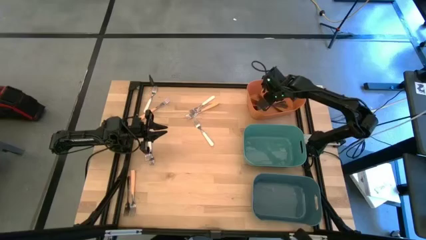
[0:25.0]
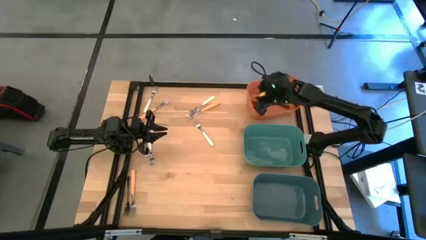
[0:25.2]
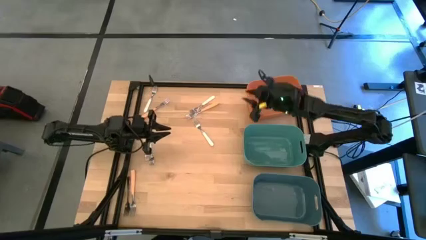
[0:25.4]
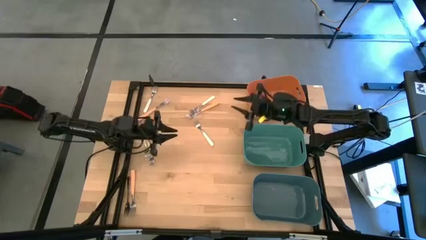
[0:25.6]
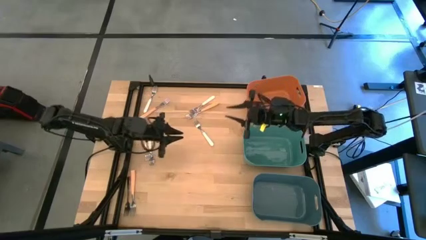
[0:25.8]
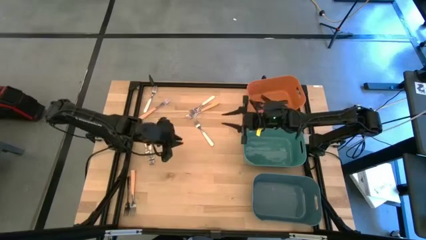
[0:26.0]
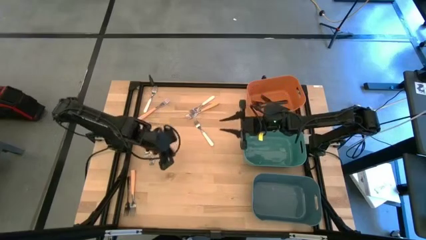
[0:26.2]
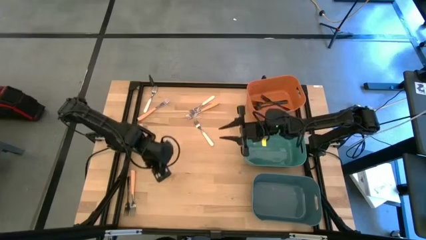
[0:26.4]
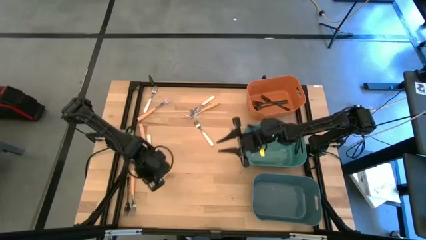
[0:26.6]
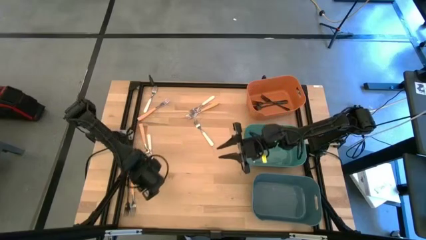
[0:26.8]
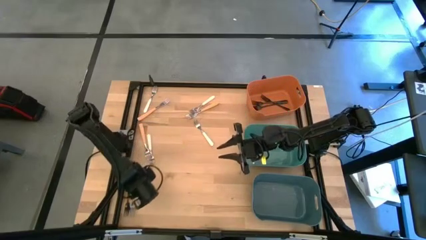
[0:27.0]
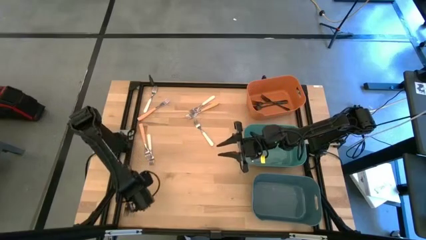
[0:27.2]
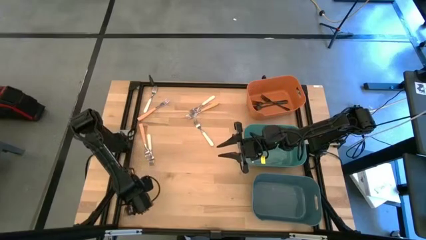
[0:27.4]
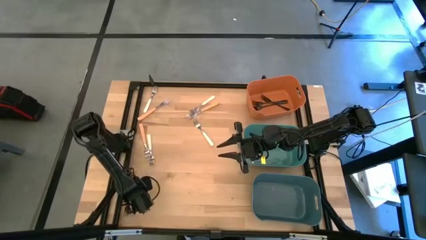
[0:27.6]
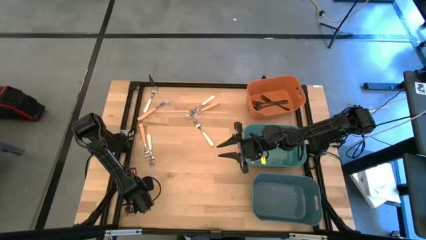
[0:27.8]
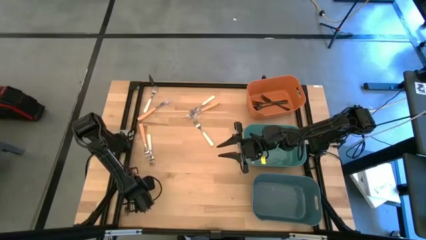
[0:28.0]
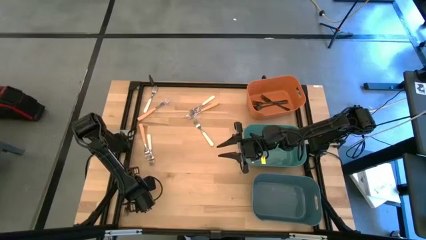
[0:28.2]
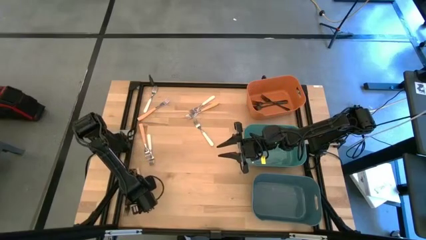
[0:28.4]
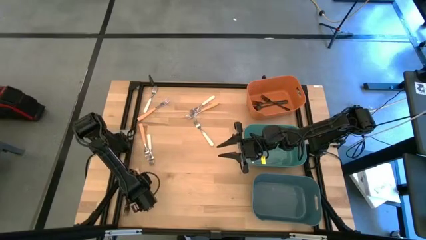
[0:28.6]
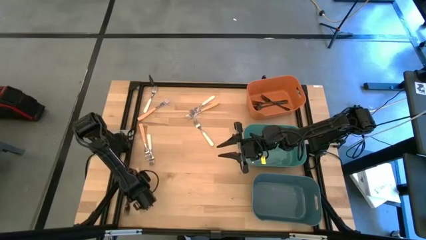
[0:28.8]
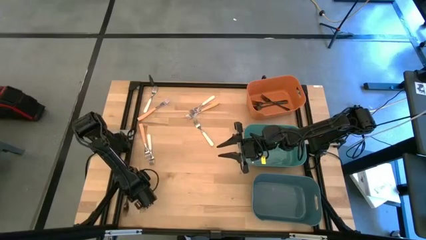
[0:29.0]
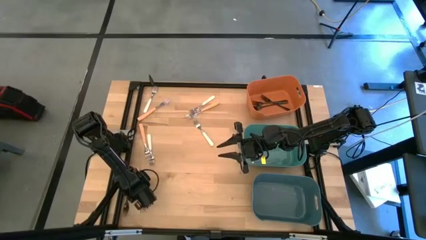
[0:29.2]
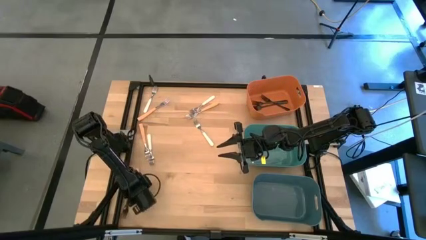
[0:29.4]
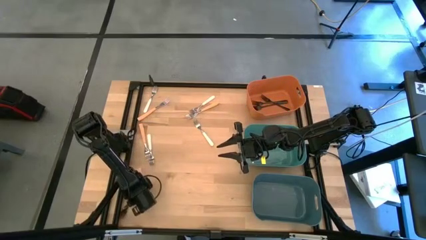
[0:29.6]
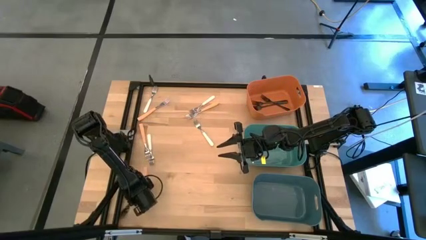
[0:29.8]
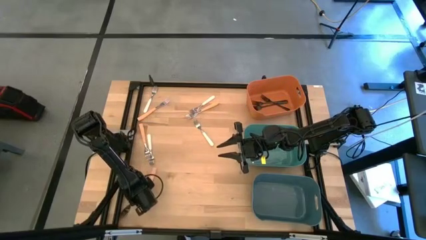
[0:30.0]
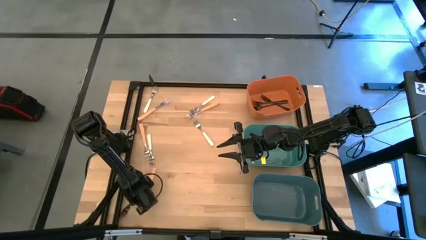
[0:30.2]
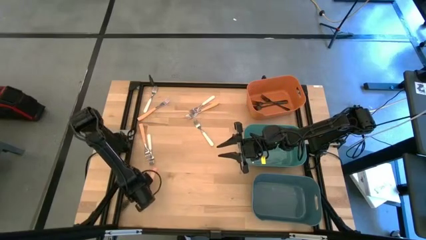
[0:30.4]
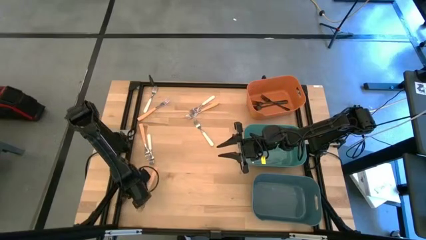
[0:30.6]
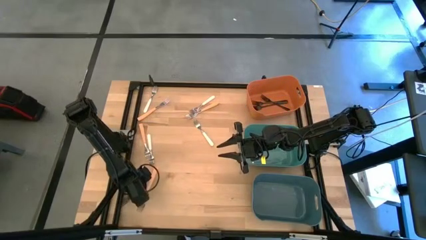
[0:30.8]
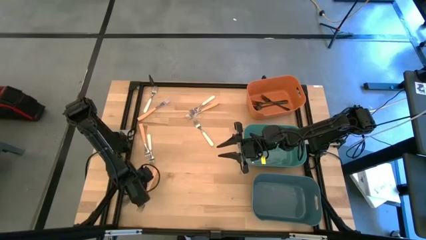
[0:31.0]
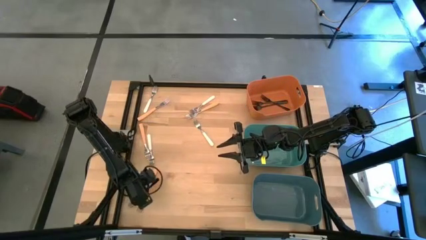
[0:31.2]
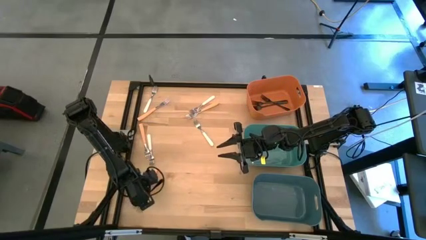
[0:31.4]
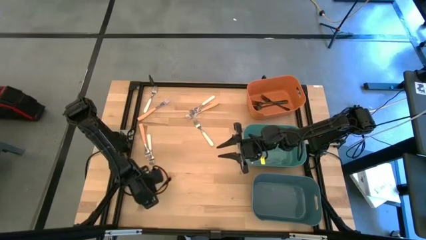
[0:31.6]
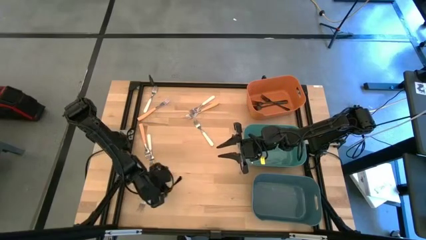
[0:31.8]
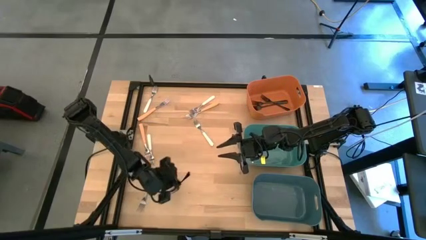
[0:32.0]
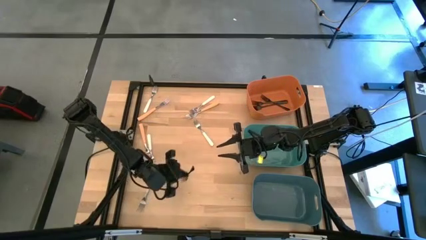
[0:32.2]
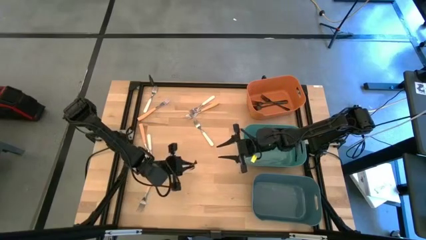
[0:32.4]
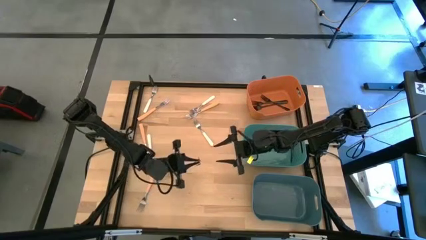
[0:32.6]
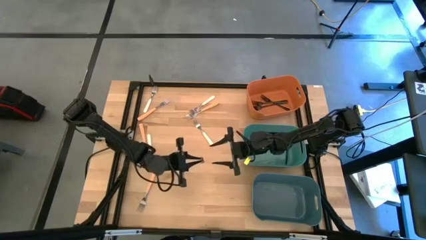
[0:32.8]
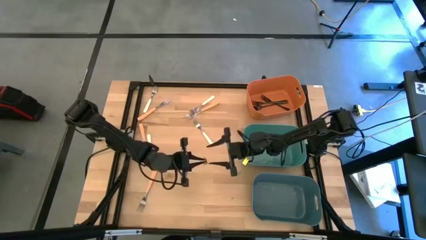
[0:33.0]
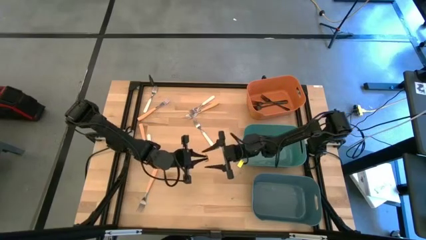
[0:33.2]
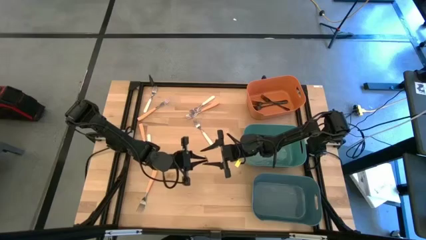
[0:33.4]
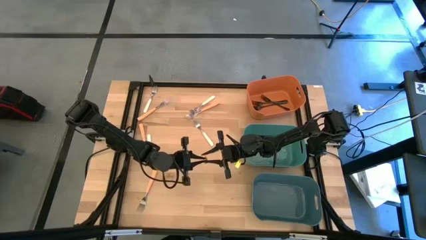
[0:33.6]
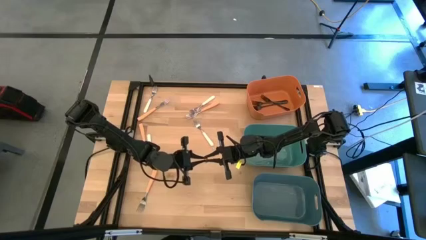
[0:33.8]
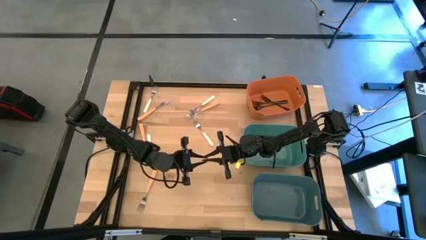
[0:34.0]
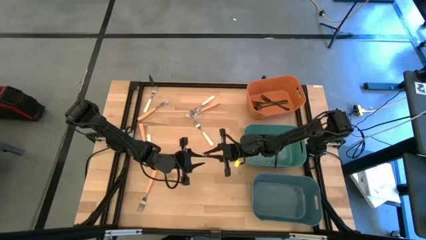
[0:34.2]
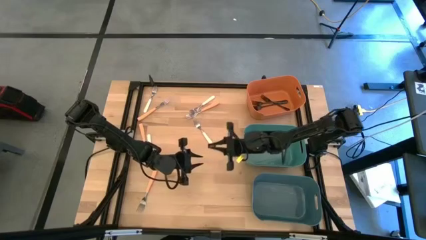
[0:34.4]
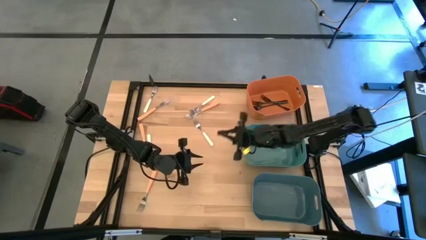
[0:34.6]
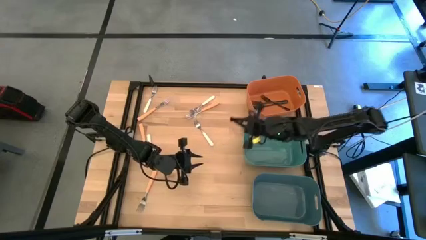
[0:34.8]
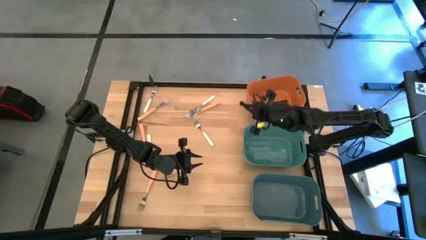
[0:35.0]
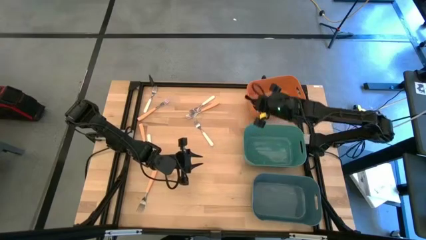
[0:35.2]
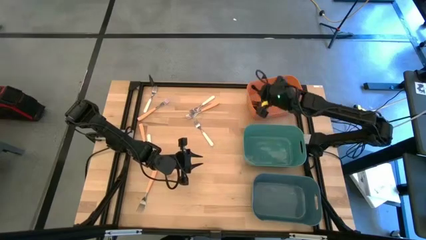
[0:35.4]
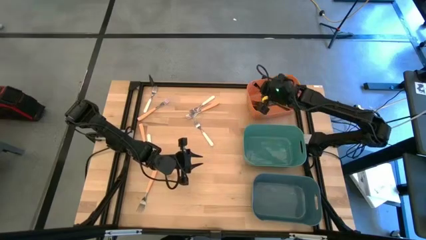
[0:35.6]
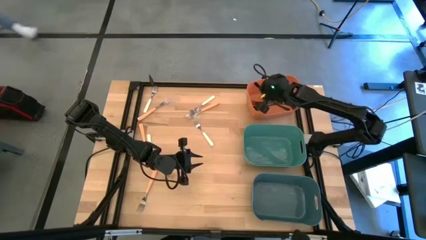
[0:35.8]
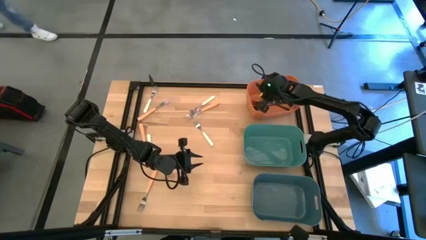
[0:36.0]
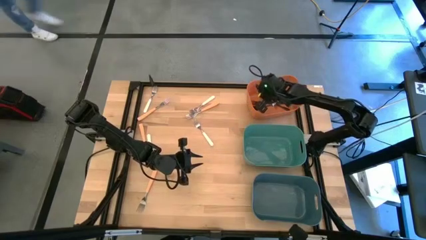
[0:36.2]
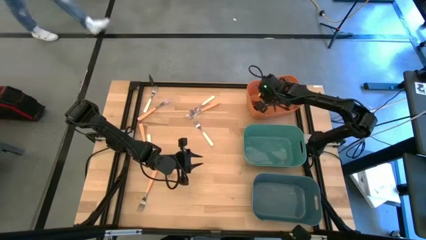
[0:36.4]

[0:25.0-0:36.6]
Task: Sort silverware by color (type)
Put the black fork into the orange bin

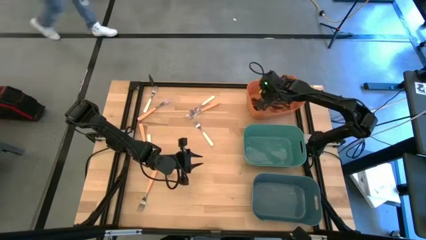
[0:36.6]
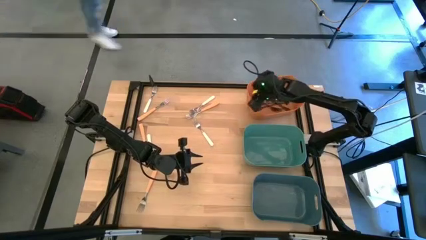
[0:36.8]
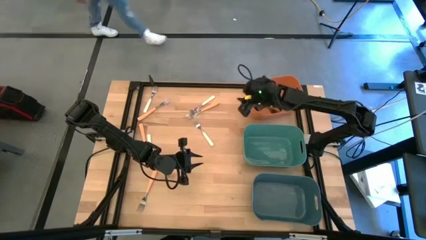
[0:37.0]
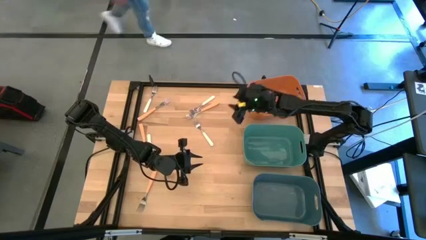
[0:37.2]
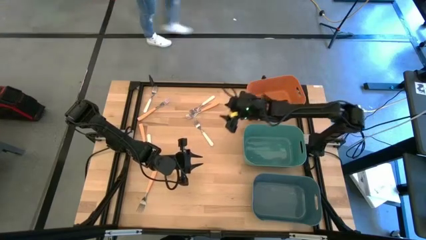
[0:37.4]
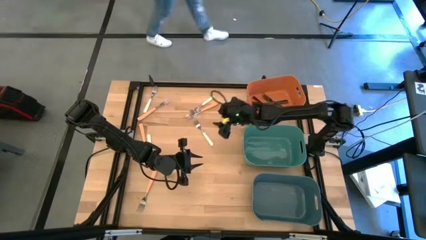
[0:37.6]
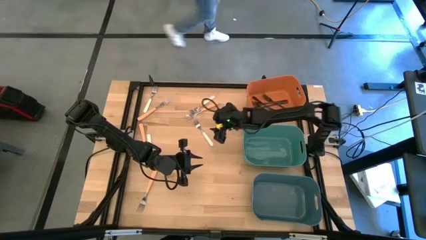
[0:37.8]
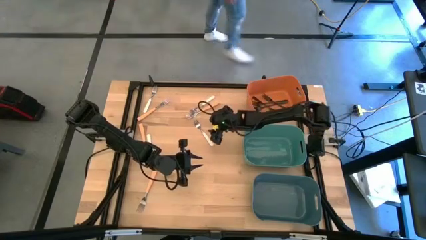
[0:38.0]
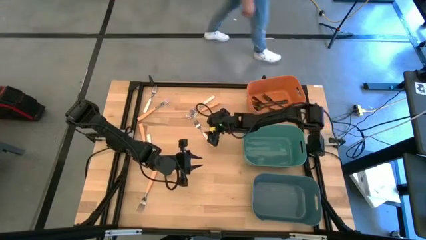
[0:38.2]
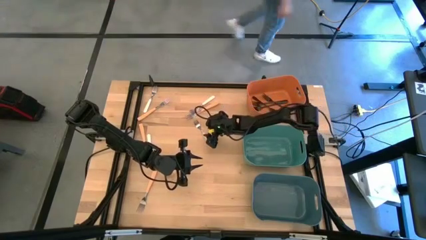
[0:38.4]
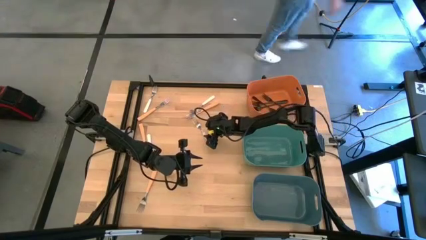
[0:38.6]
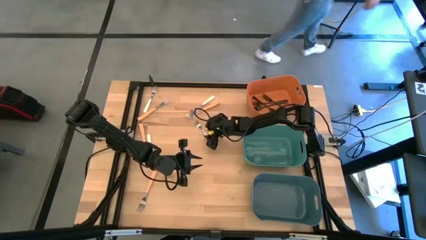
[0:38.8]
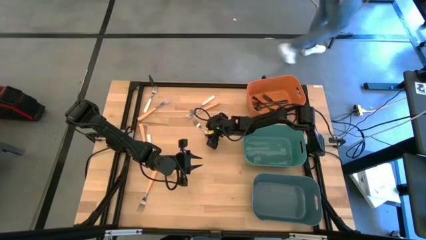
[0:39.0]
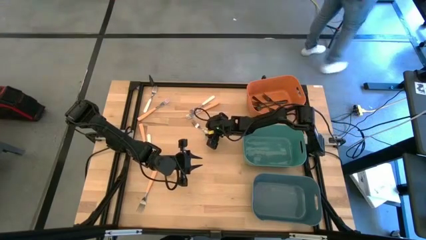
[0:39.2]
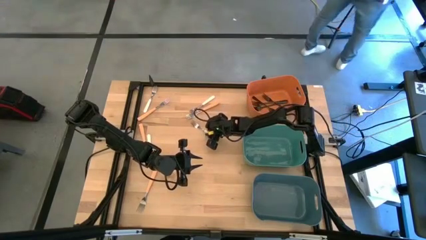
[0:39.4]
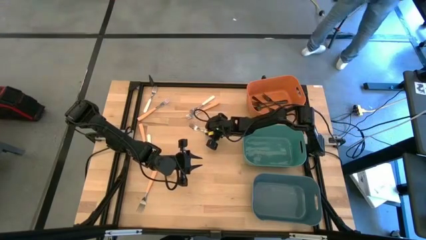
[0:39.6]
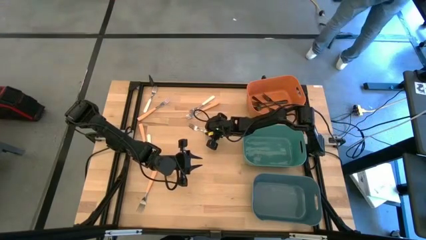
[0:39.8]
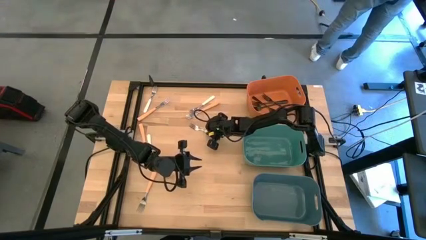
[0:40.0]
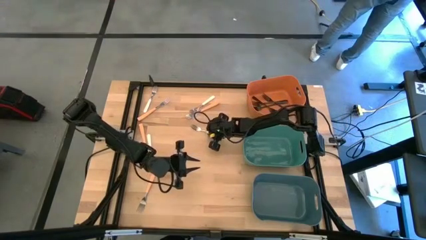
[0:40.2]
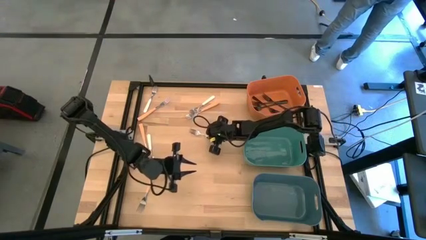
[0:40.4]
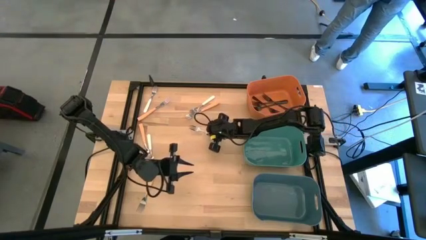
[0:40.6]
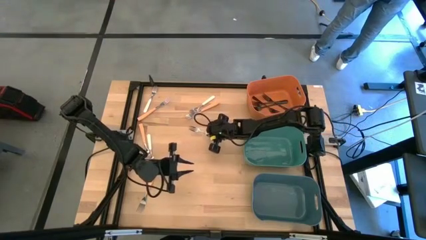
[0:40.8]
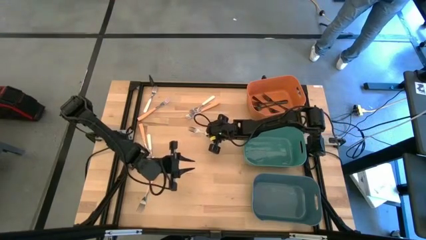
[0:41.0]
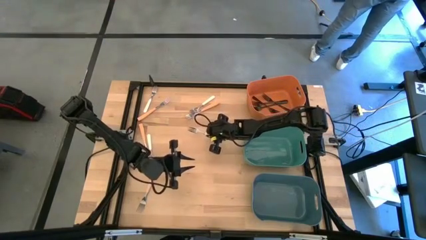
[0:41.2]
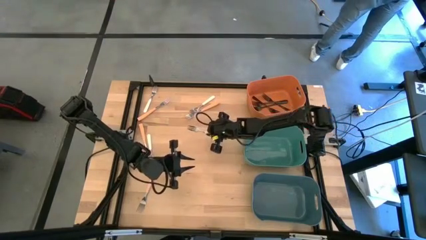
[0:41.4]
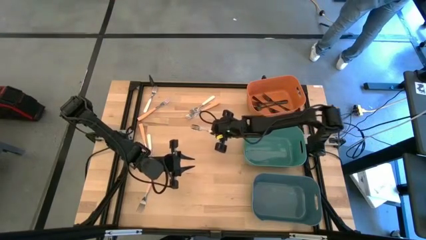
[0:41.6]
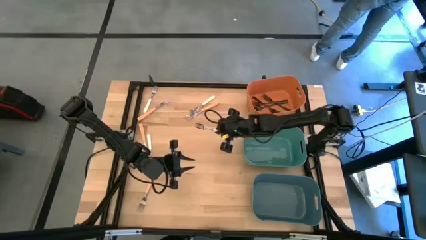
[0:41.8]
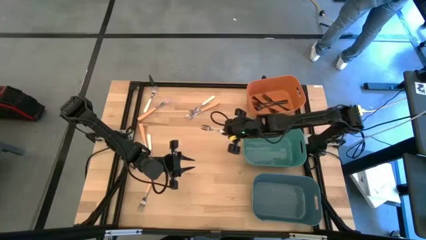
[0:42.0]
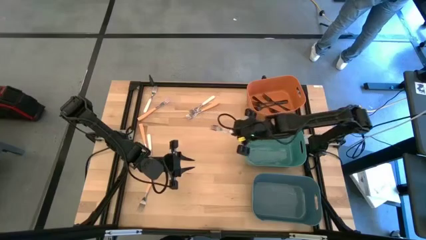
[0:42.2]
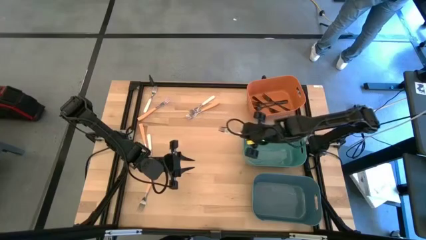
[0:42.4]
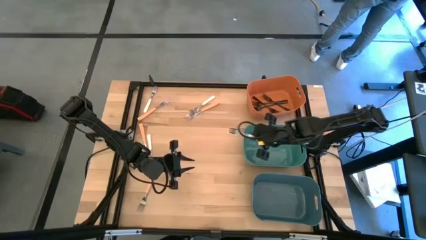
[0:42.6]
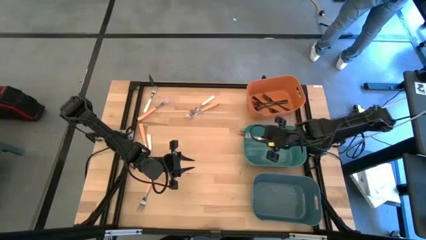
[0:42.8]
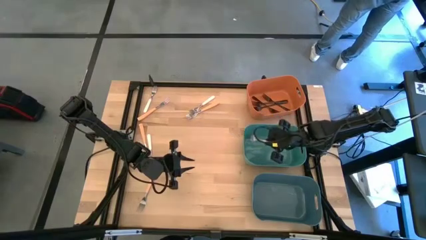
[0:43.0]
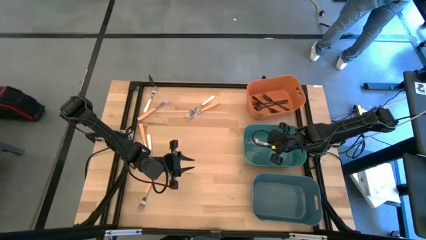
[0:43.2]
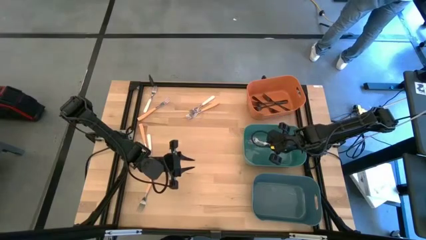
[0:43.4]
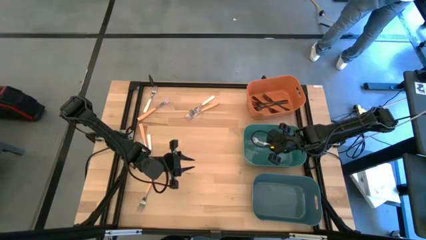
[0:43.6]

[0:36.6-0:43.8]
Put the white fork into the green bin
